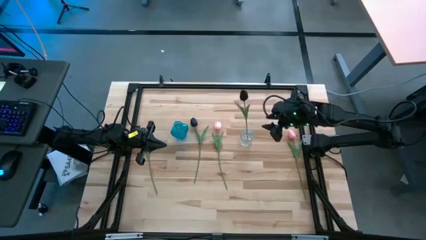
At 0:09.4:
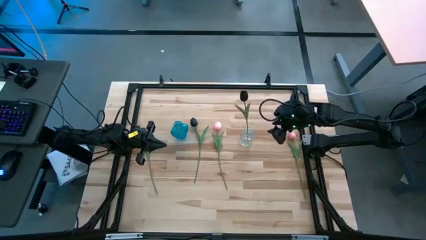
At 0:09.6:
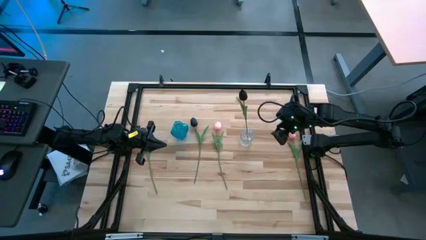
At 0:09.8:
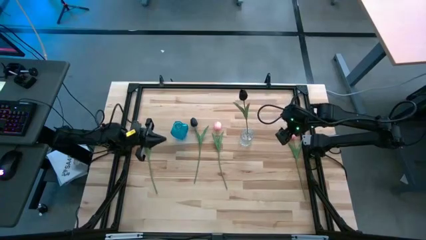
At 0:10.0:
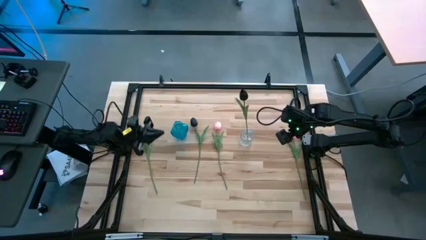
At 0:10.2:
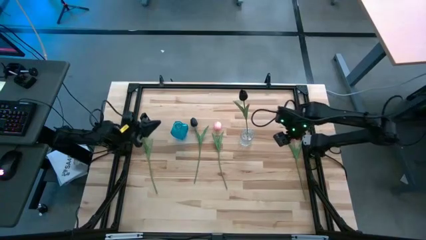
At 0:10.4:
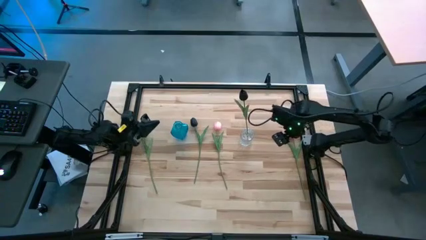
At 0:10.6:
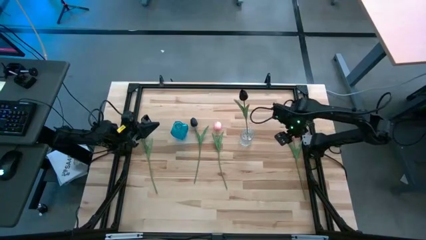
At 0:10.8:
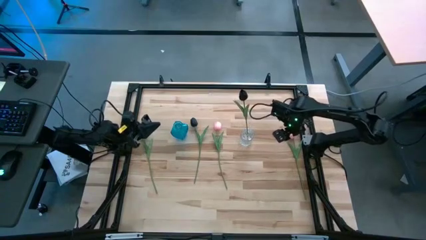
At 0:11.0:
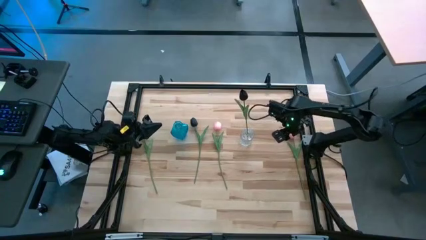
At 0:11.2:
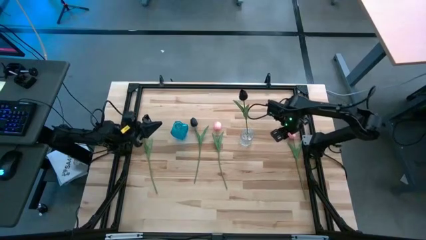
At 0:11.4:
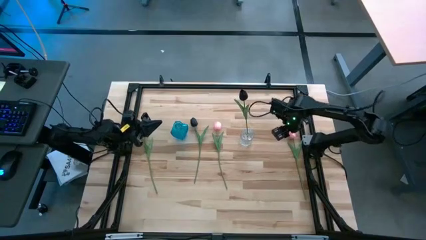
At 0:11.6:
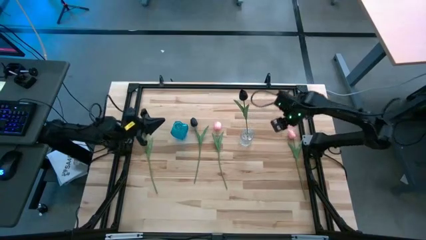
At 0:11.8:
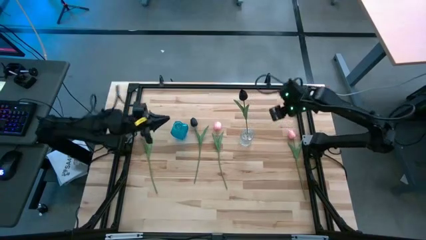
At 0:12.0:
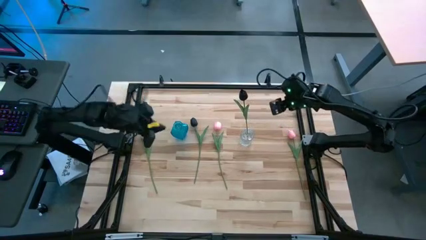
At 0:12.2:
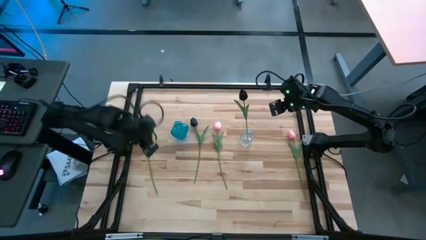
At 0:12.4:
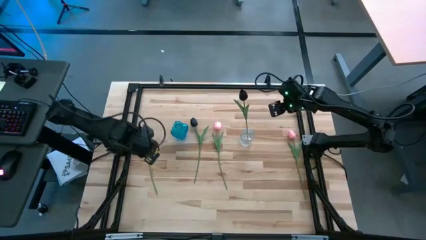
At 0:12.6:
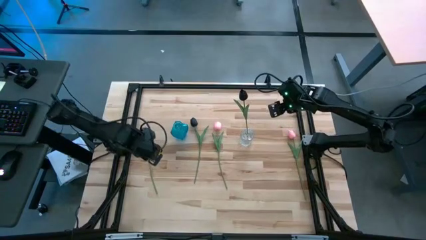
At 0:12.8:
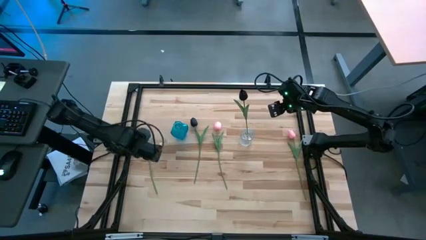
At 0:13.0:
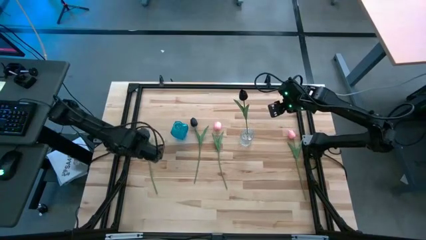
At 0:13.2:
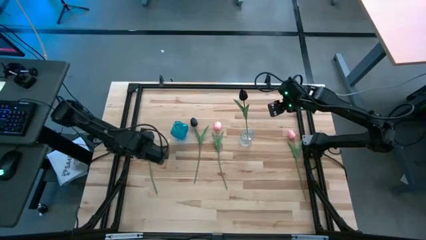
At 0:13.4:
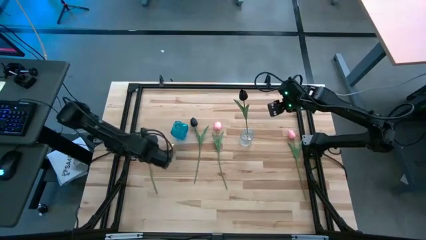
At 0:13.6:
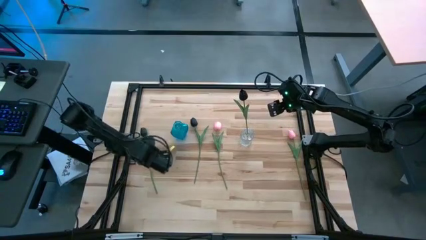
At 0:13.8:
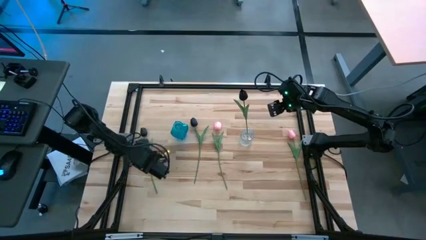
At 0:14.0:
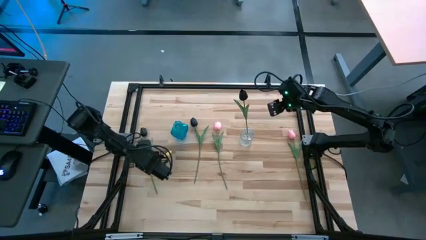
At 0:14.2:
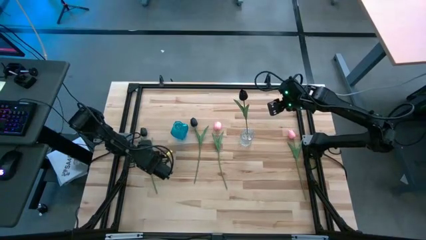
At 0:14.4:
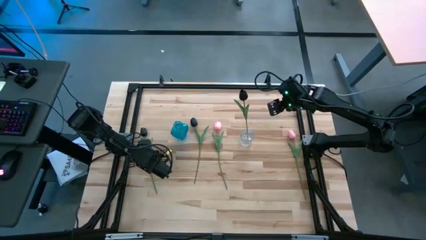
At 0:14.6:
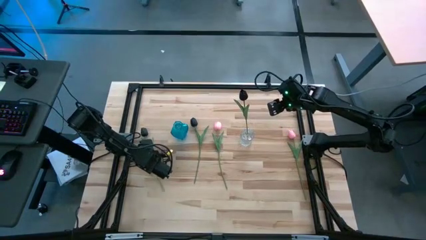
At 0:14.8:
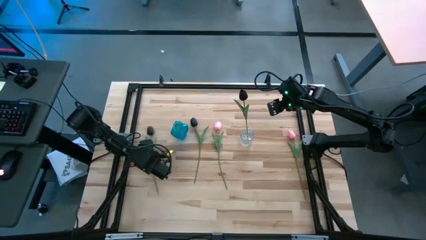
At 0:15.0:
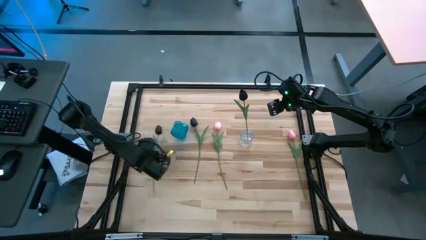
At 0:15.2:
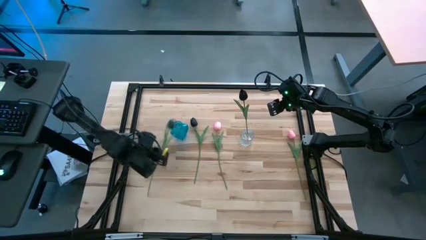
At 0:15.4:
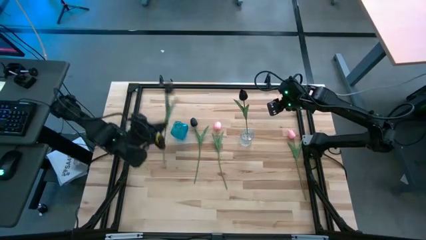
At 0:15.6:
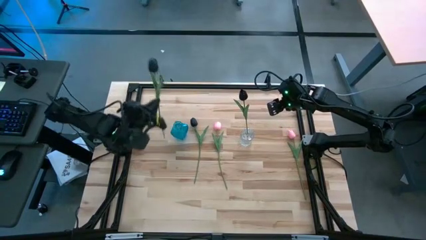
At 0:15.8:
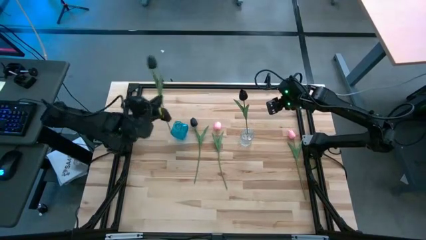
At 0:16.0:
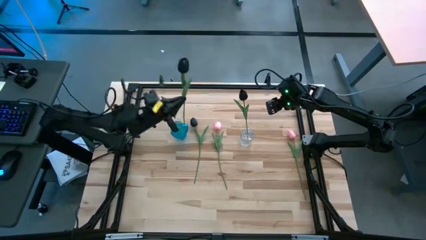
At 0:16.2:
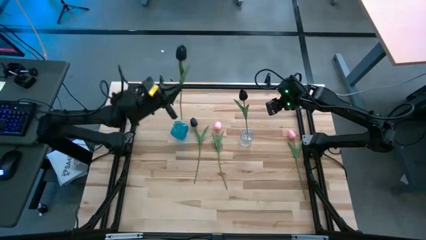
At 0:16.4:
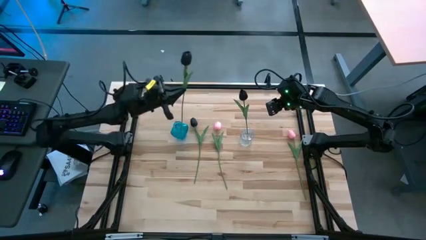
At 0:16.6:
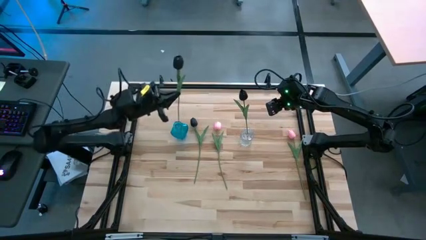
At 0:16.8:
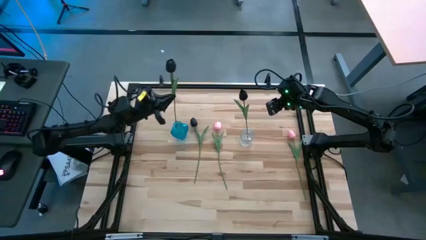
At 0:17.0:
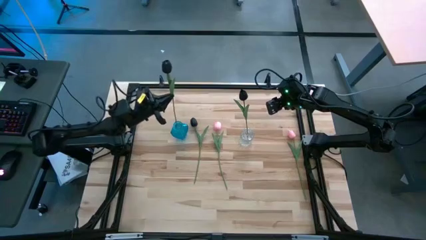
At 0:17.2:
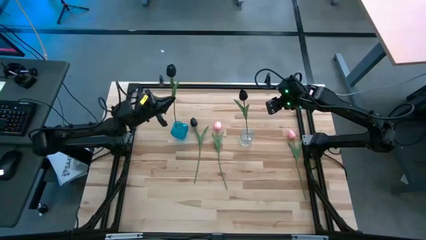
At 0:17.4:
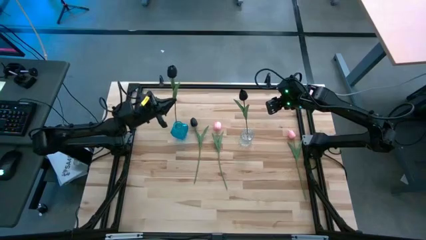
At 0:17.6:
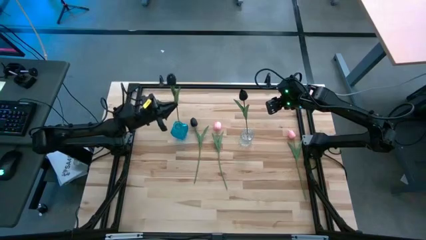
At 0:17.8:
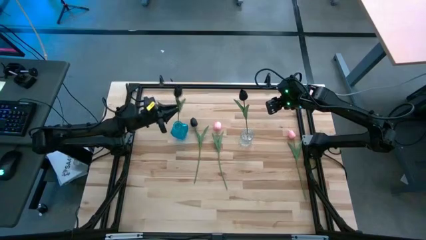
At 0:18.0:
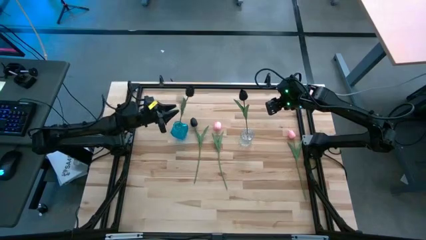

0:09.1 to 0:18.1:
Task: Sort flowers into vase by color
Put the left black flower into the blue vase

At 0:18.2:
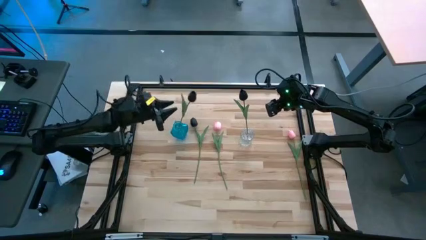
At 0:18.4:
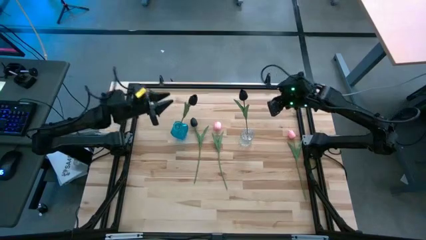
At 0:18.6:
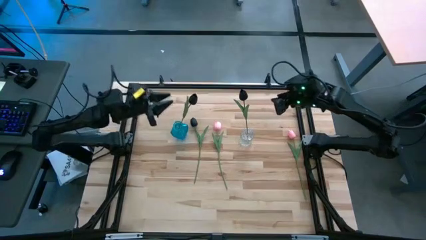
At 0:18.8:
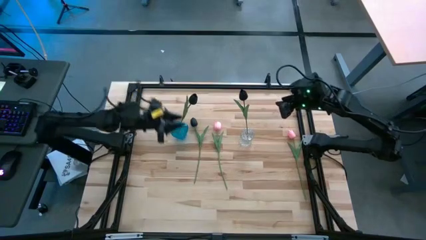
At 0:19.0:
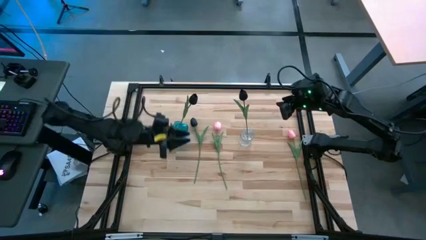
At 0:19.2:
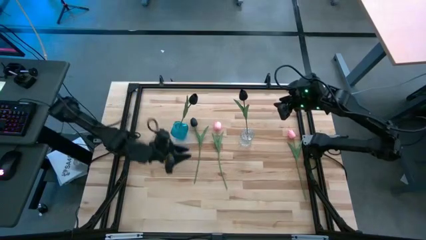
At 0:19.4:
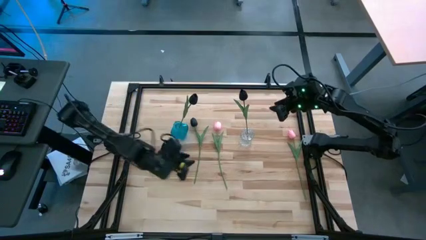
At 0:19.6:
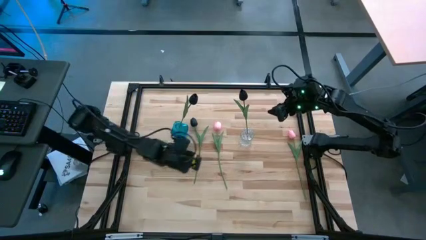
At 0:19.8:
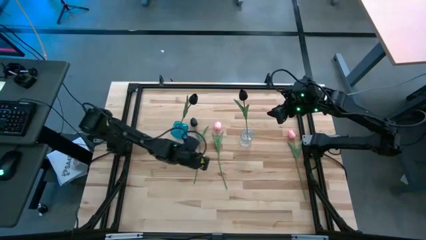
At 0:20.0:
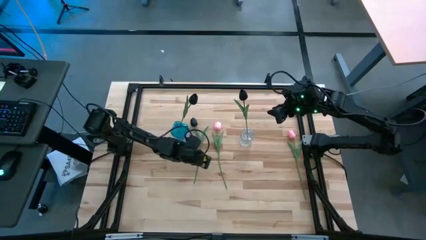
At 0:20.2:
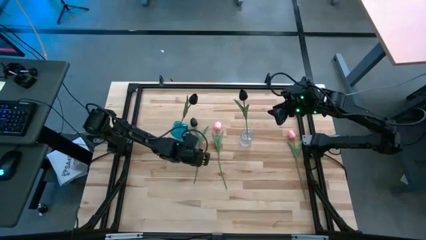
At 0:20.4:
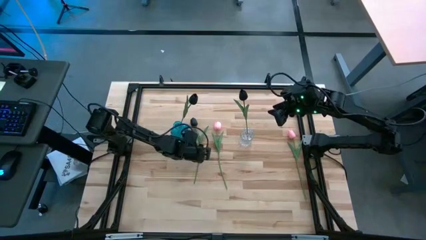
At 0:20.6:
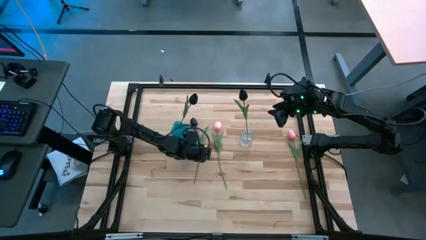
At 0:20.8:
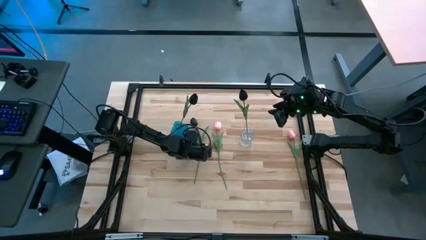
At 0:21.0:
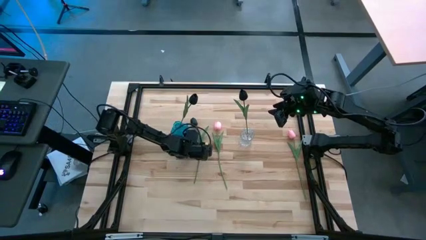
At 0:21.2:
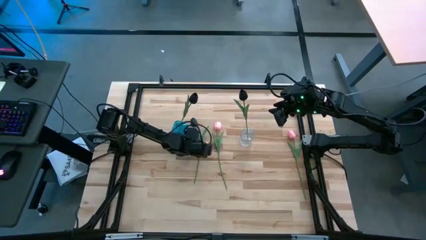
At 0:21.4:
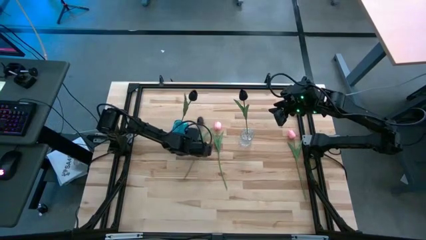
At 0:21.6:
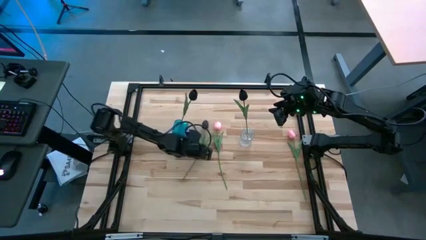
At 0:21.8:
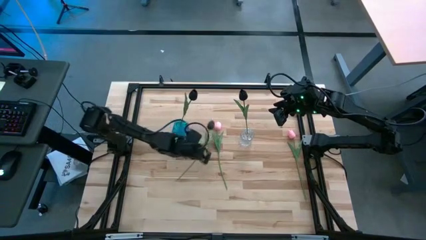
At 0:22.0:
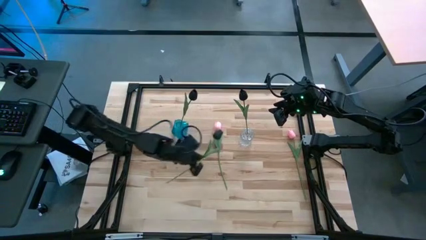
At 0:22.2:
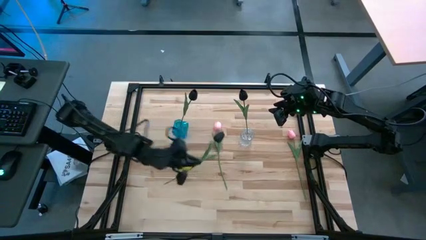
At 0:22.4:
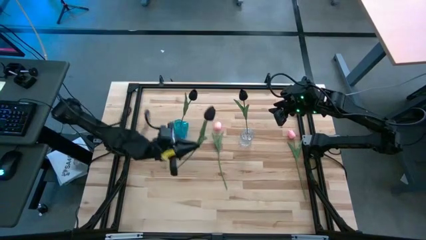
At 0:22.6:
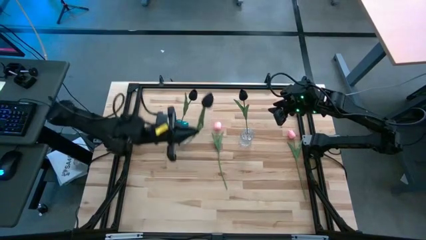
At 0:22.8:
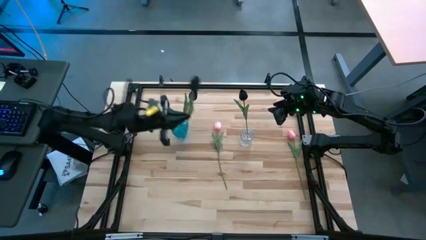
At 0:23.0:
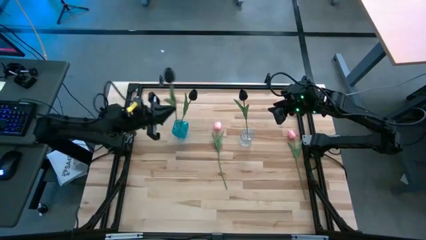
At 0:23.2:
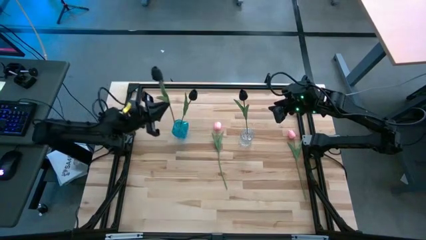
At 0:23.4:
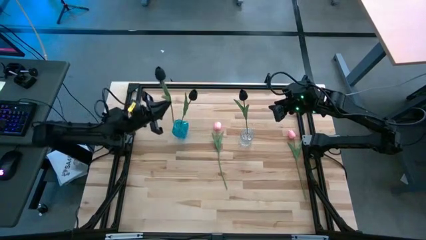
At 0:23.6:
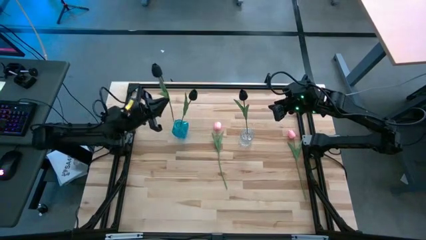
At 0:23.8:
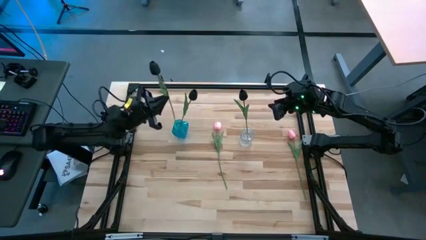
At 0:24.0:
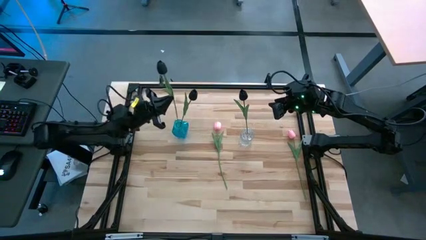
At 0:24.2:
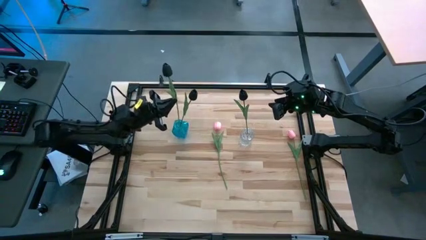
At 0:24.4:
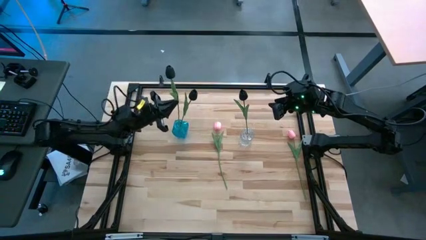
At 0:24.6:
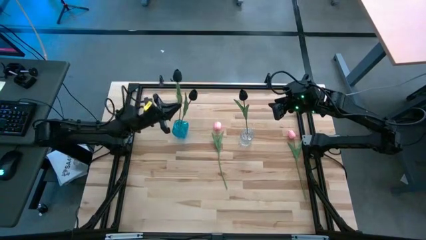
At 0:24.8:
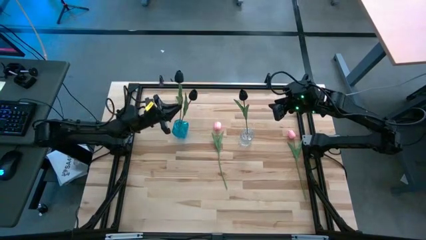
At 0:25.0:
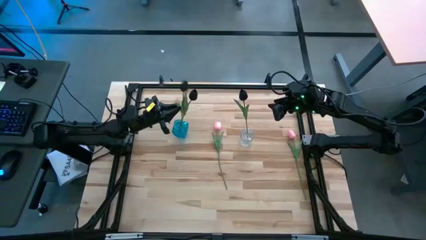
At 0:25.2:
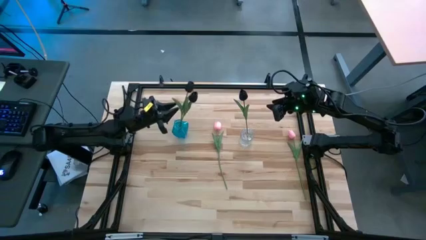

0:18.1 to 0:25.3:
Put the black flower into the blue vase
